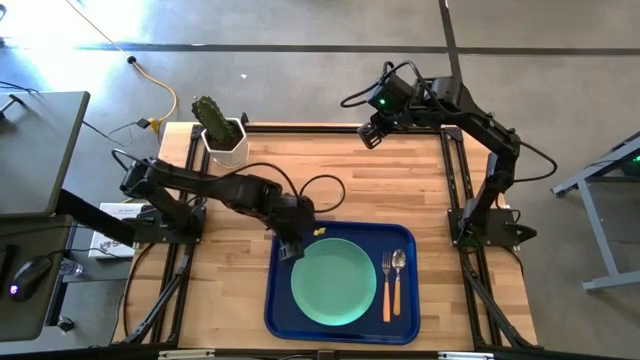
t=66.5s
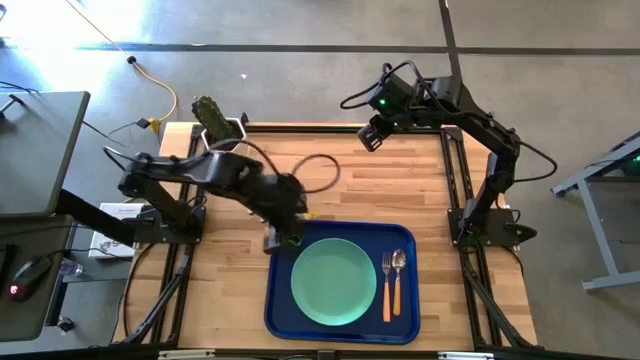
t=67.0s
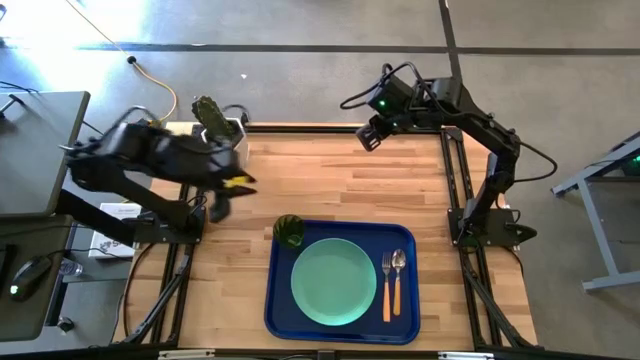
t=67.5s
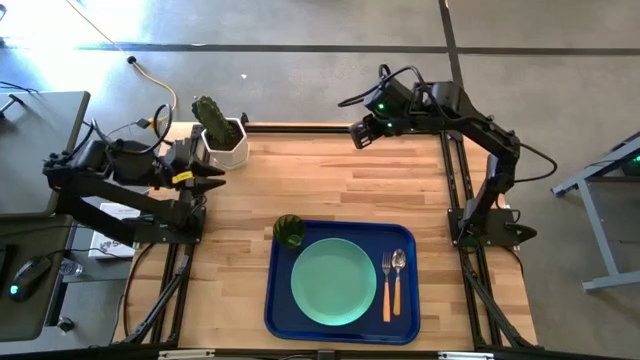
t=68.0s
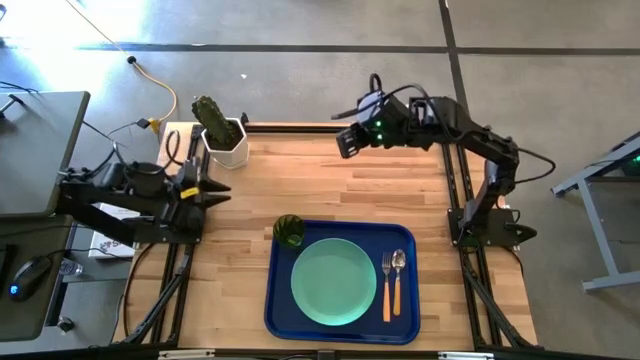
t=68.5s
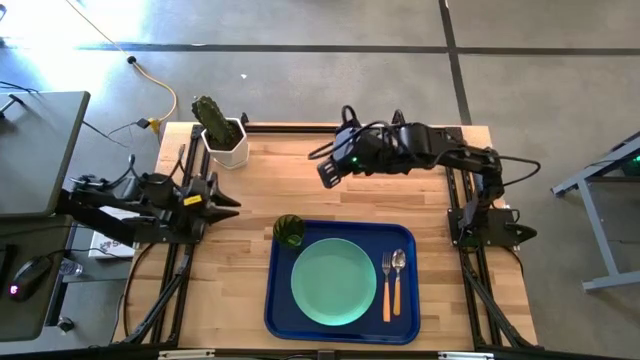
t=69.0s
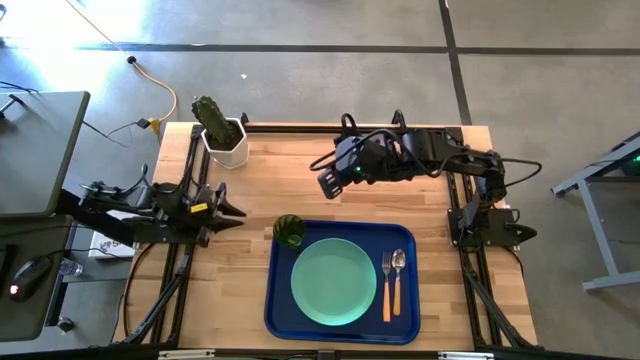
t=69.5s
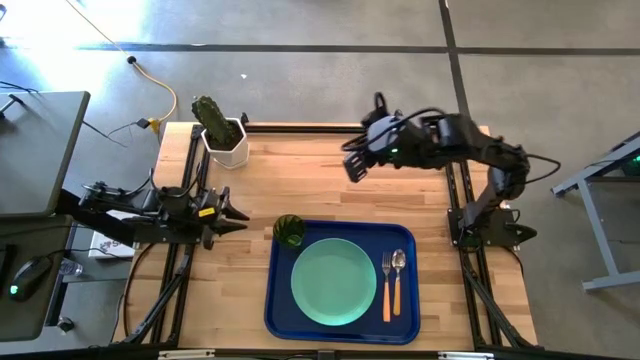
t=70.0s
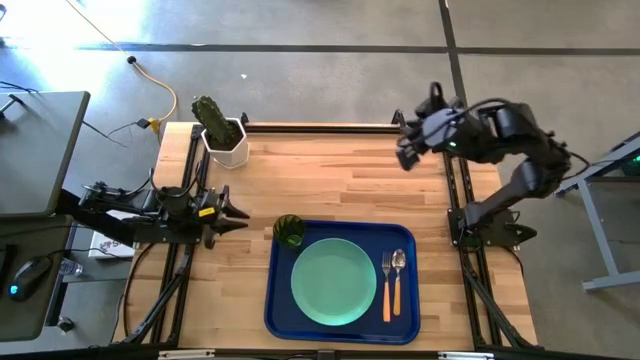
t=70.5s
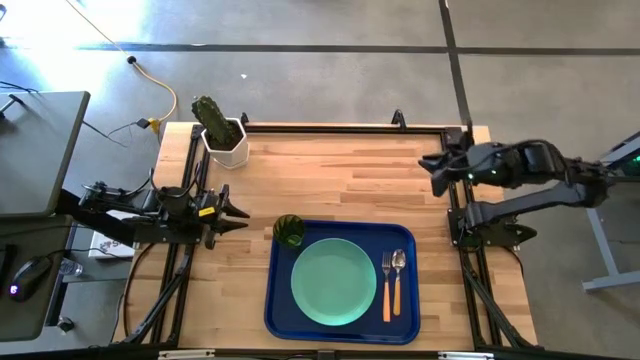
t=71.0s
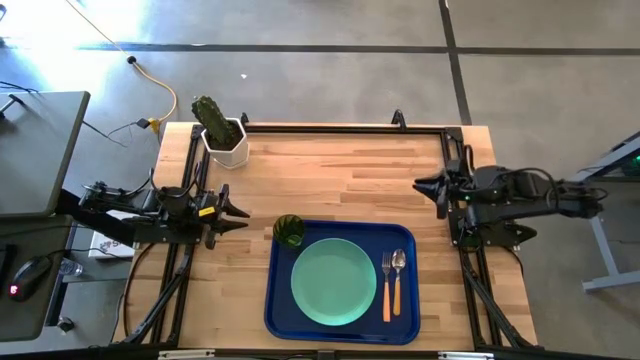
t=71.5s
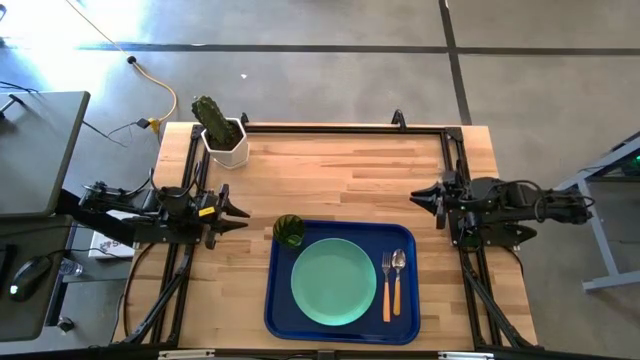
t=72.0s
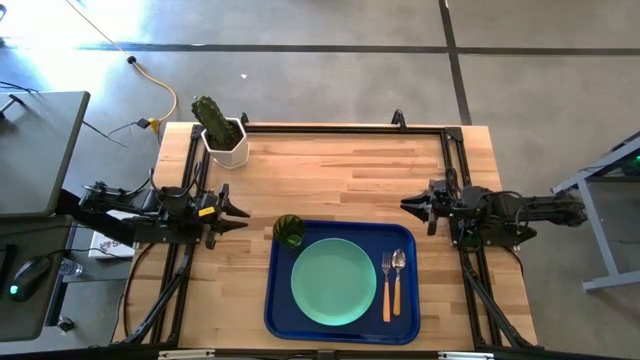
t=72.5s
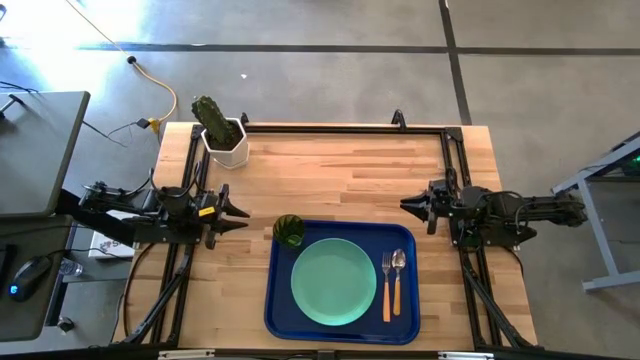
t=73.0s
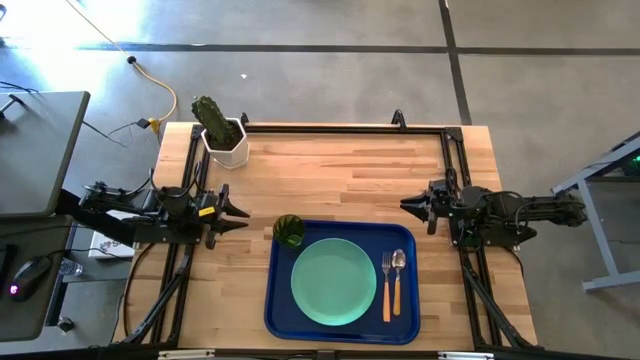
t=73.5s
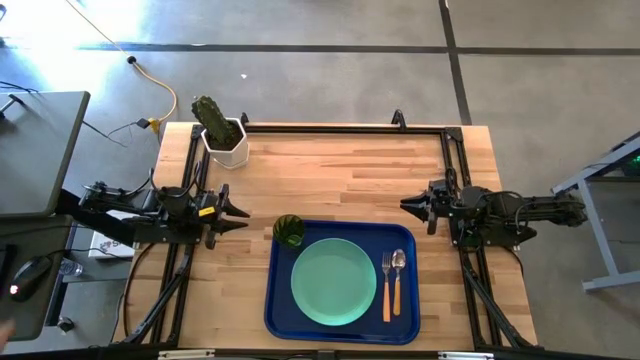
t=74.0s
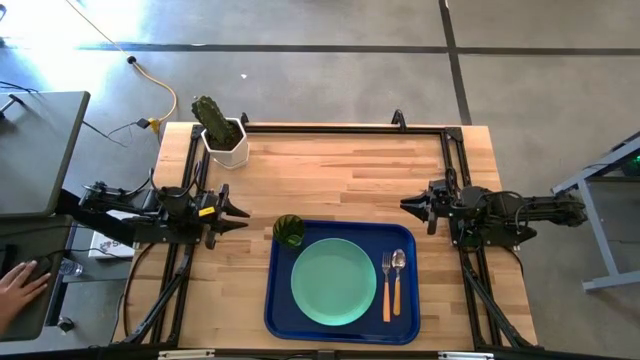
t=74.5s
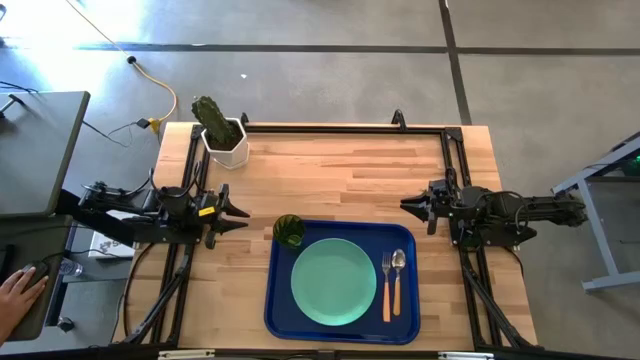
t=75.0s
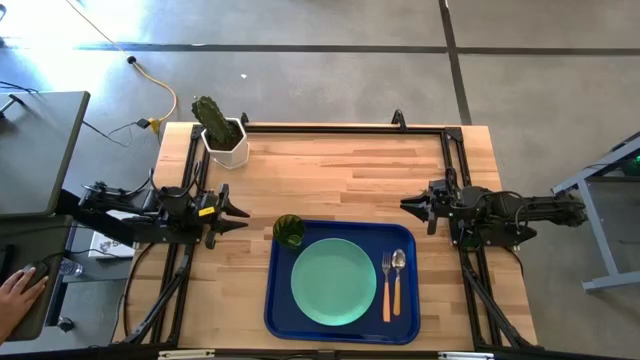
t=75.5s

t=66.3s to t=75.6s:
Task: Pick and place plate/cup/fork/spoon on tray
Return to Home Position

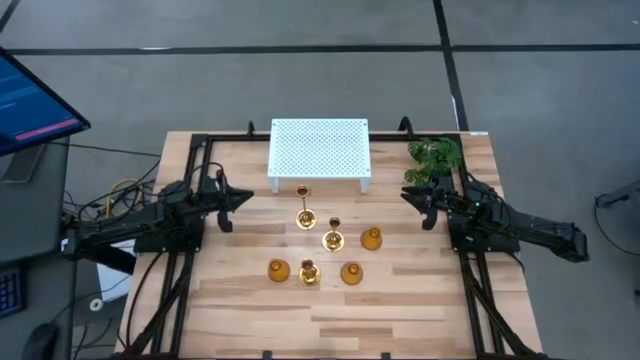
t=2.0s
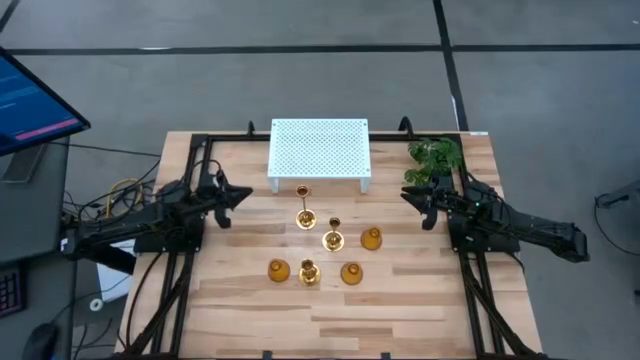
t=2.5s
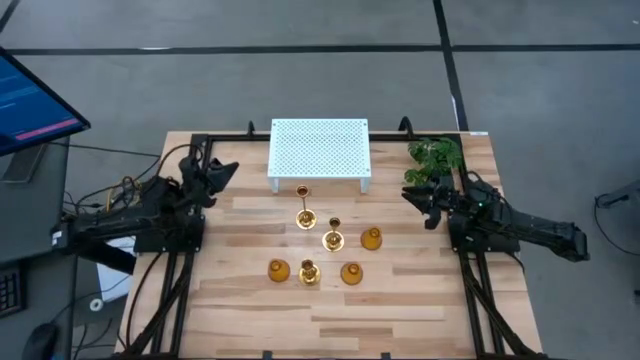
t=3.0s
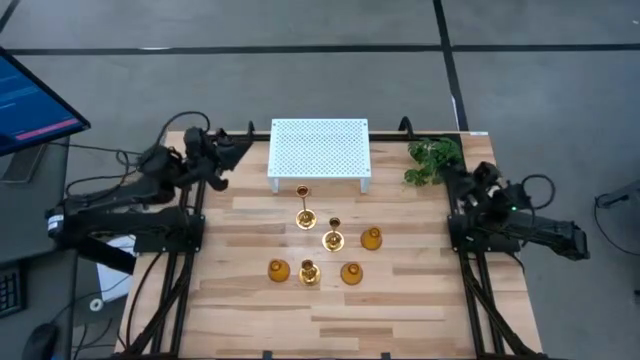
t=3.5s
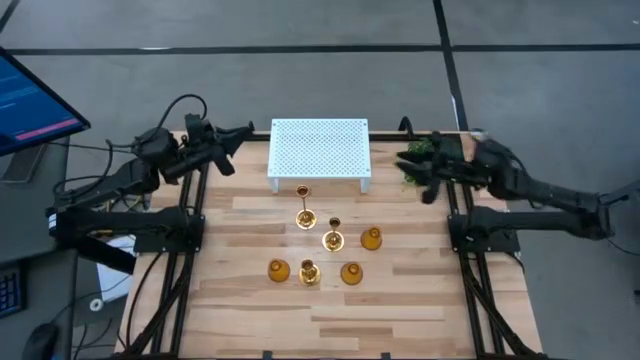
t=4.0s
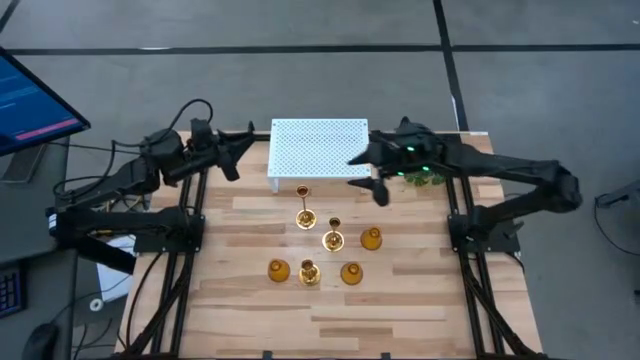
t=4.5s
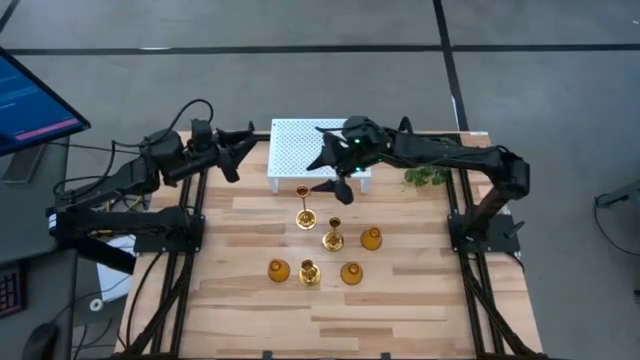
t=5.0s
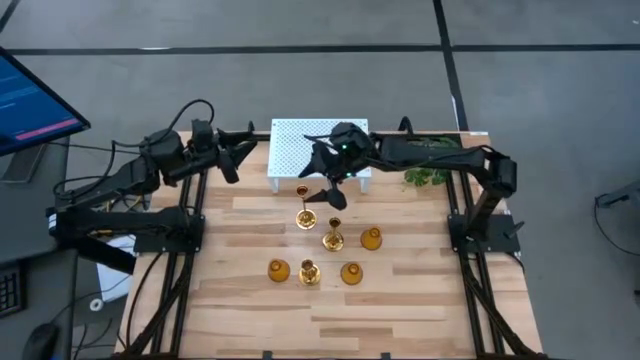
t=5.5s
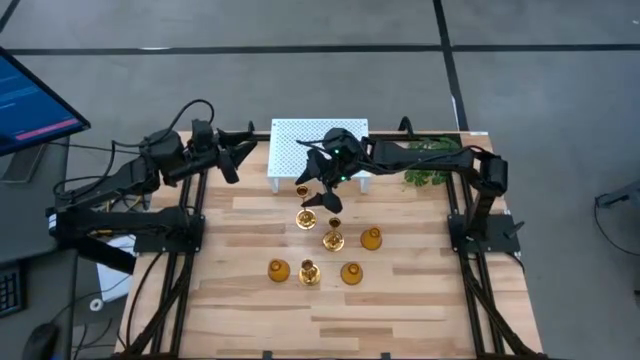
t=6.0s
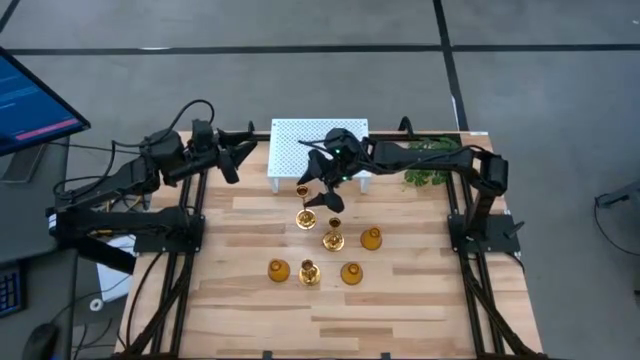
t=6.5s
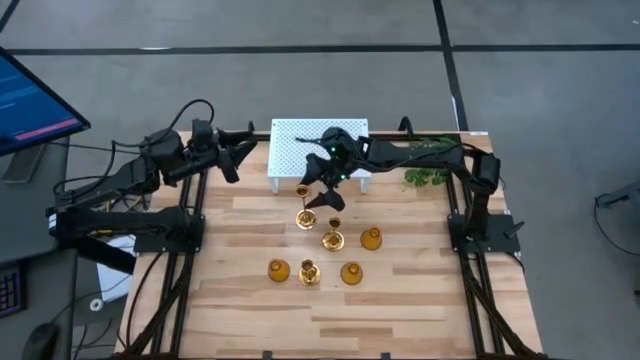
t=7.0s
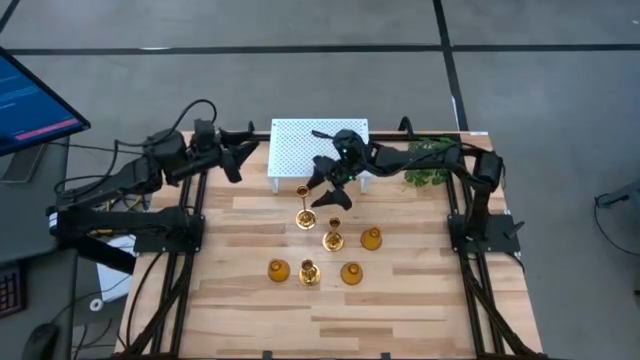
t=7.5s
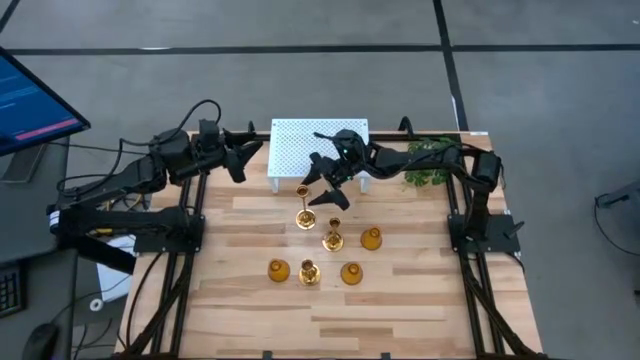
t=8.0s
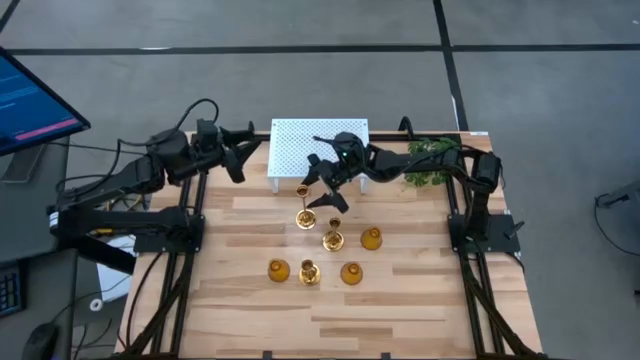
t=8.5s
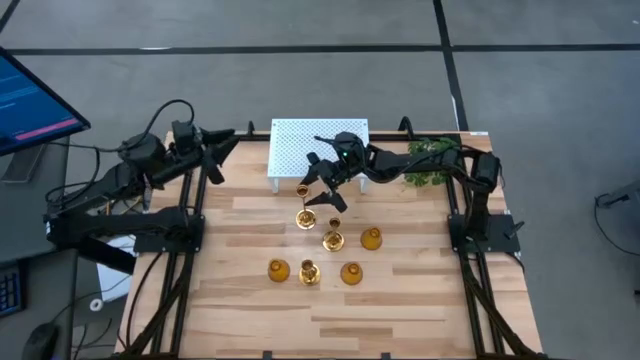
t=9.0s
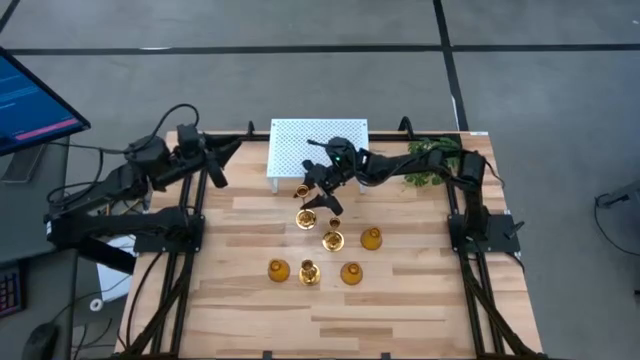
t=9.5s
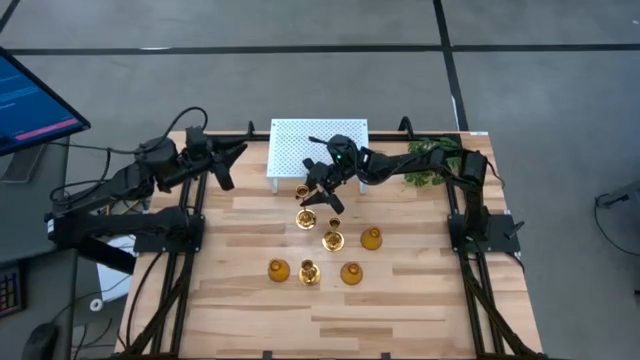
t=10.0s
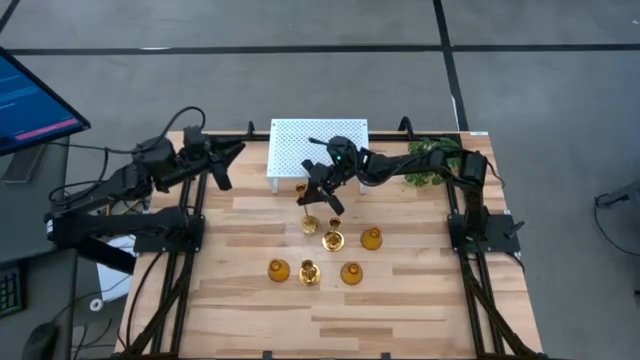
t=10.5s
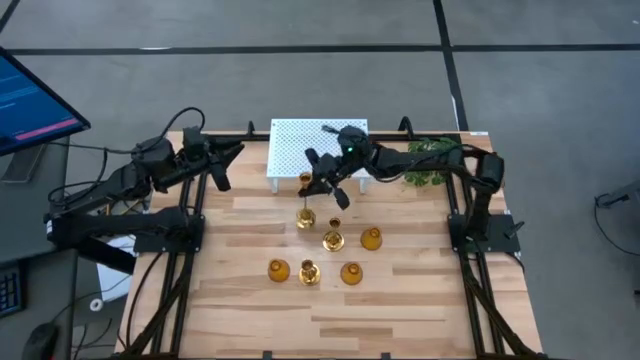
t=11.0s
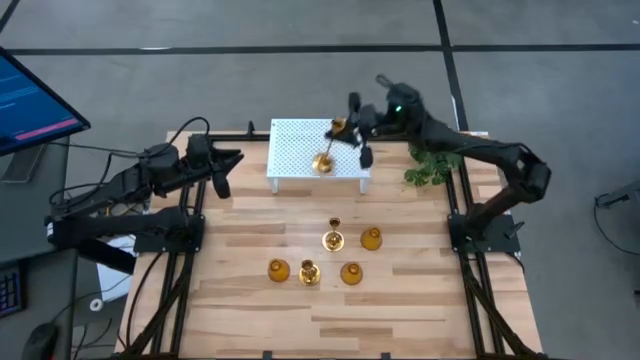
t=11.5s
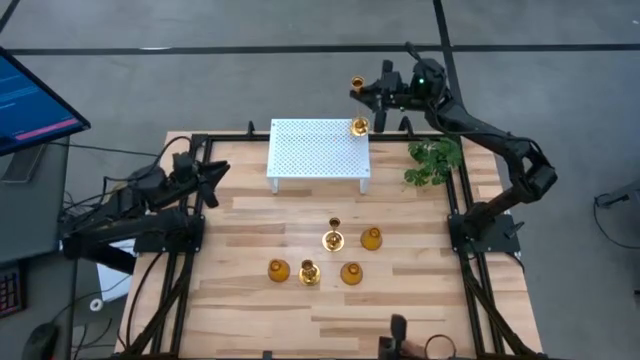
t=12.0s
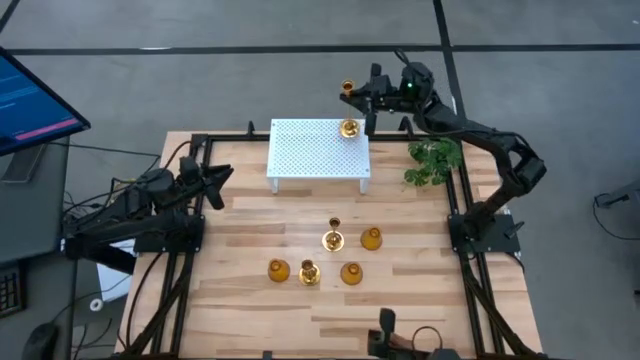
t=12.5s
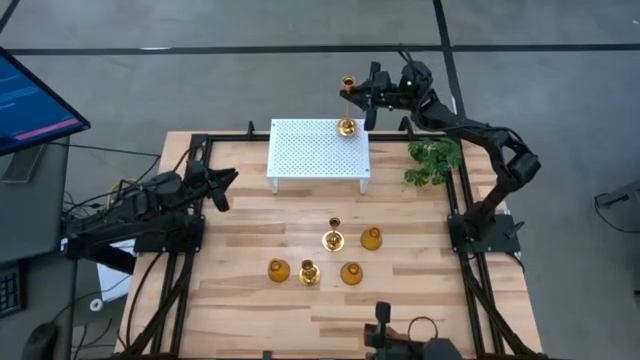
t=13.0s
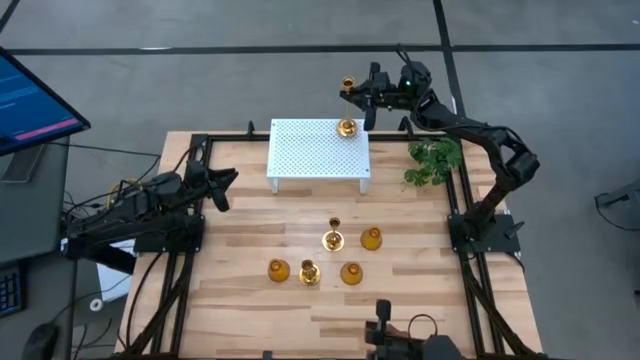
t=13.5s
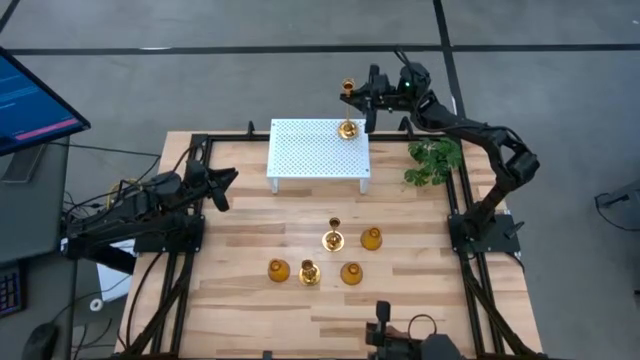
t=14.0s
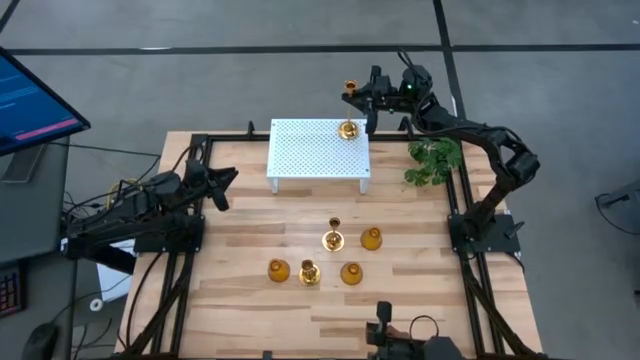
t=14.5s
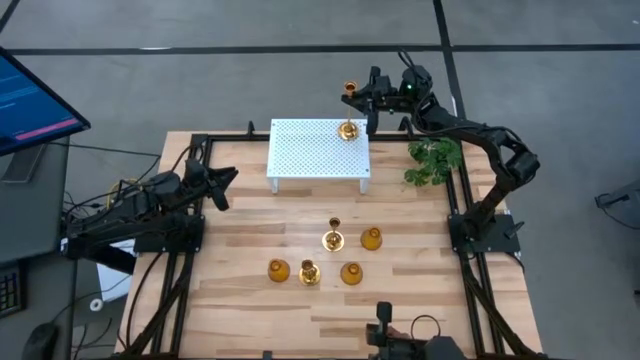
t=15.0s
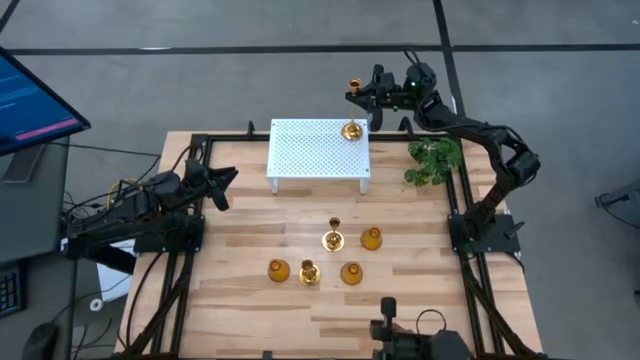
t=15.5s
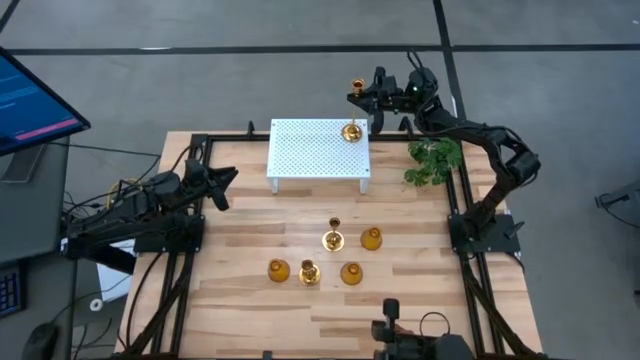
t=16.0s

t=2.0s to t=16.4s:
Task: Pick & Place candle stick holders
Put the large gold candle holder on the shelf
